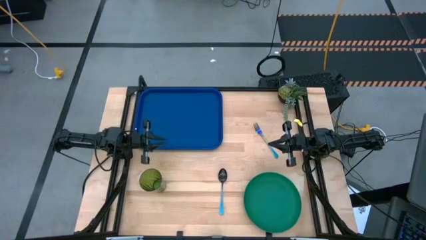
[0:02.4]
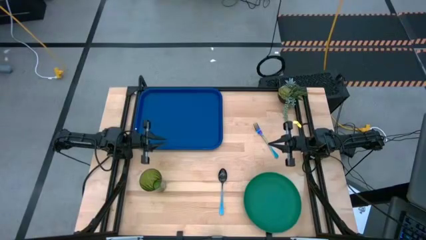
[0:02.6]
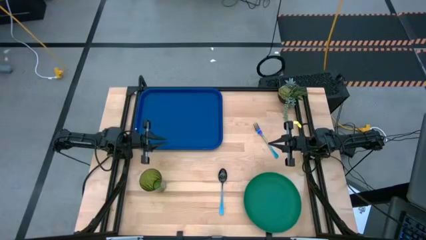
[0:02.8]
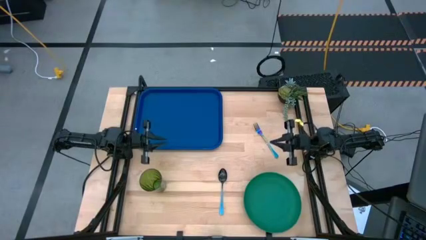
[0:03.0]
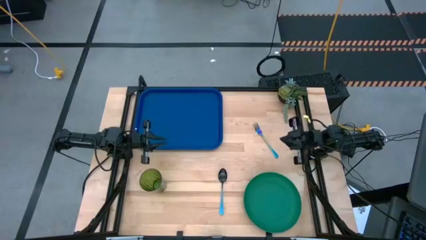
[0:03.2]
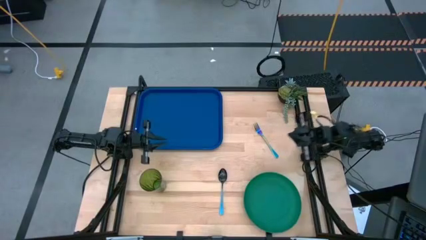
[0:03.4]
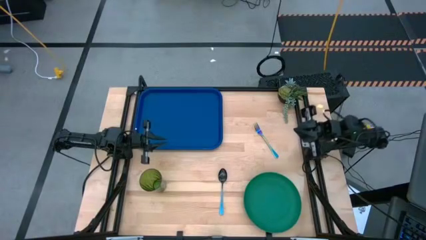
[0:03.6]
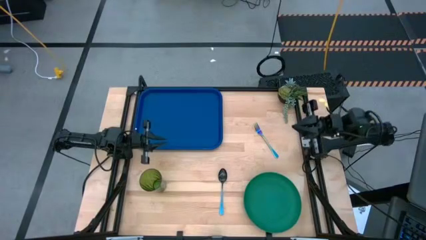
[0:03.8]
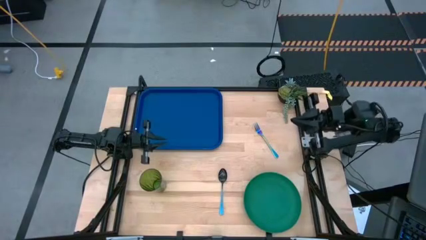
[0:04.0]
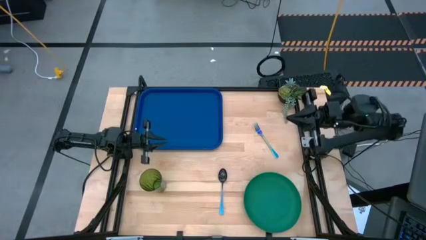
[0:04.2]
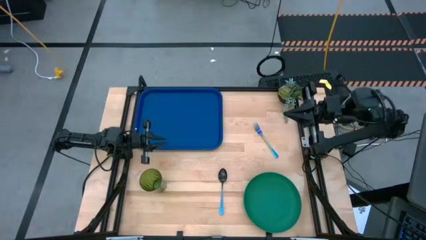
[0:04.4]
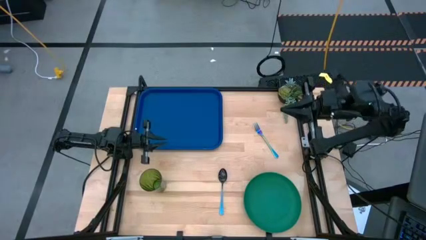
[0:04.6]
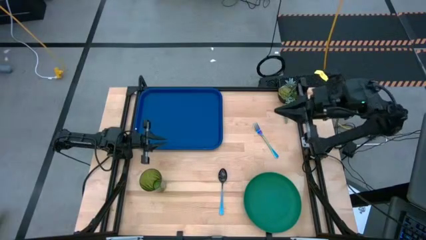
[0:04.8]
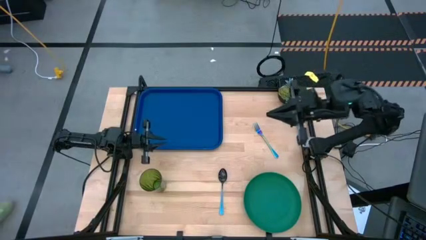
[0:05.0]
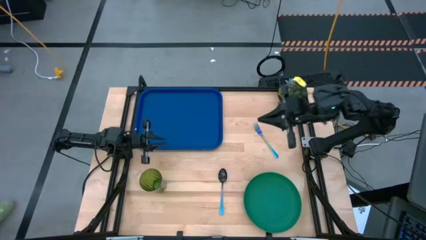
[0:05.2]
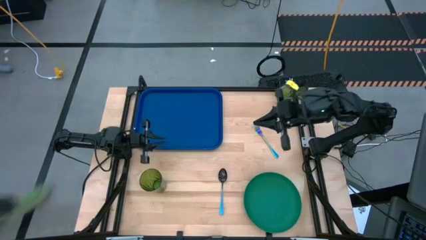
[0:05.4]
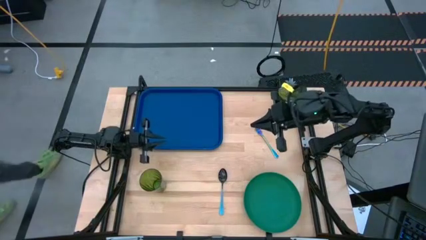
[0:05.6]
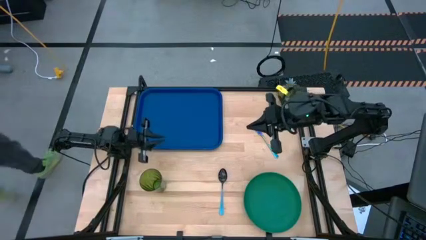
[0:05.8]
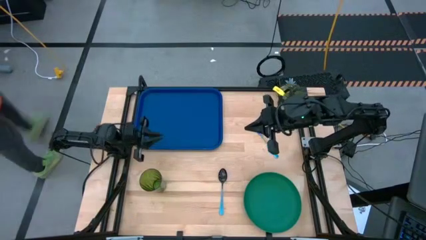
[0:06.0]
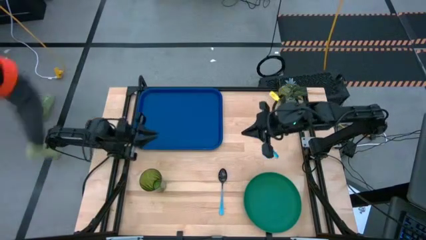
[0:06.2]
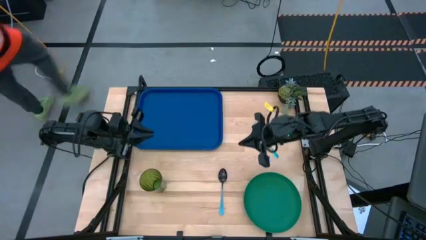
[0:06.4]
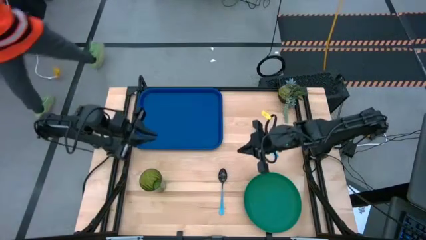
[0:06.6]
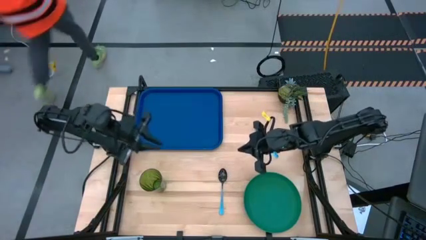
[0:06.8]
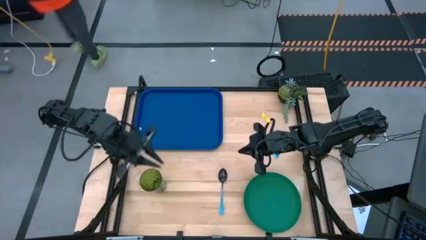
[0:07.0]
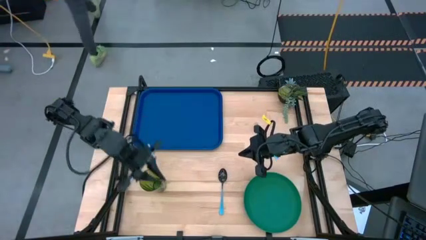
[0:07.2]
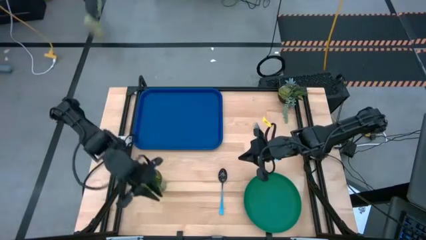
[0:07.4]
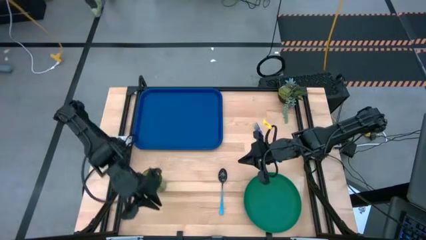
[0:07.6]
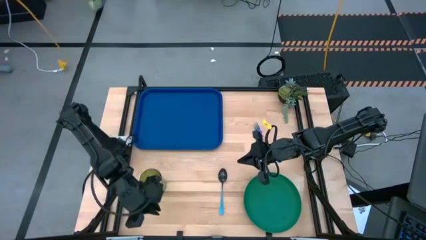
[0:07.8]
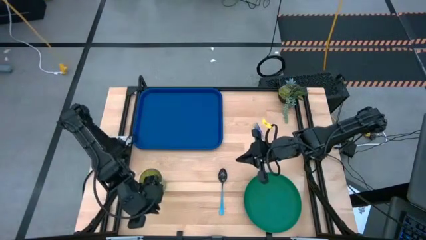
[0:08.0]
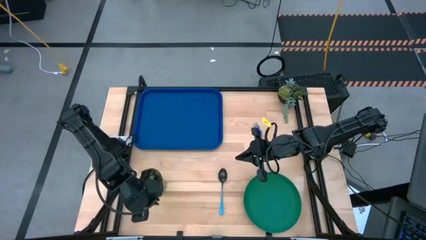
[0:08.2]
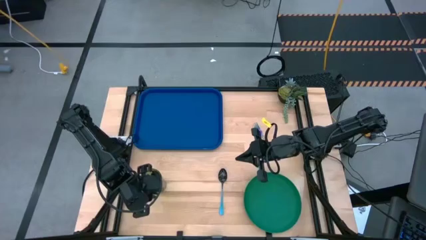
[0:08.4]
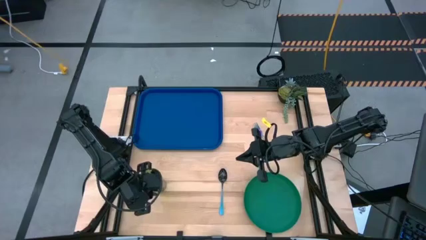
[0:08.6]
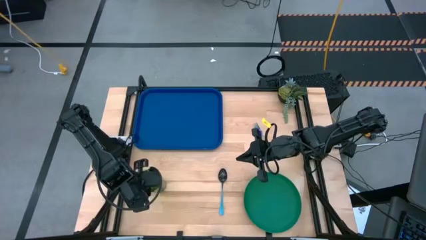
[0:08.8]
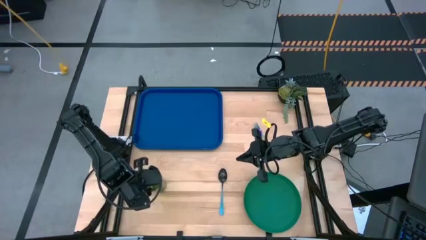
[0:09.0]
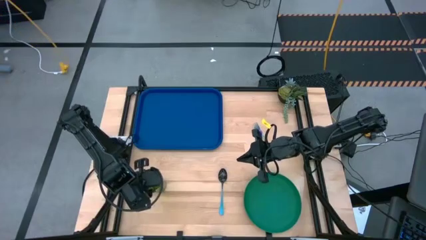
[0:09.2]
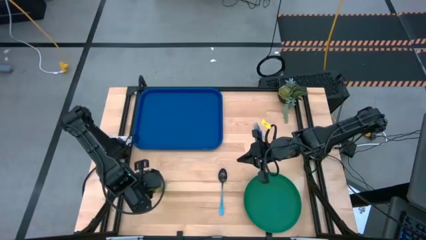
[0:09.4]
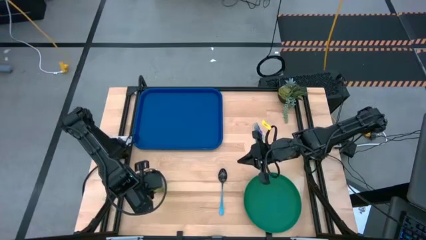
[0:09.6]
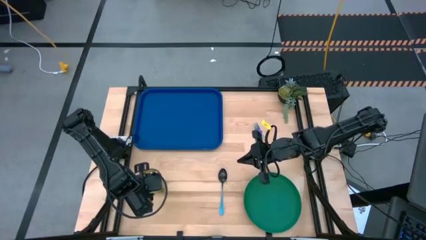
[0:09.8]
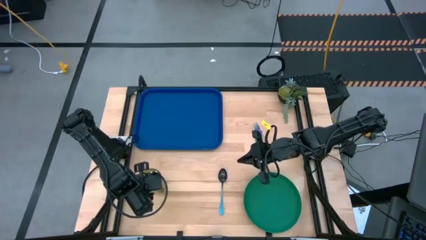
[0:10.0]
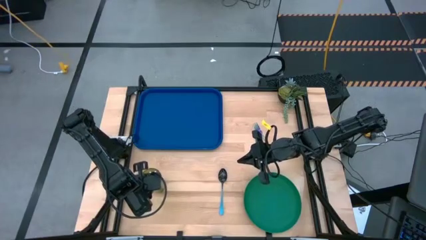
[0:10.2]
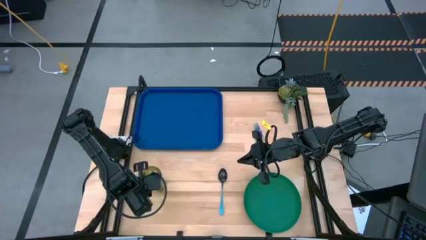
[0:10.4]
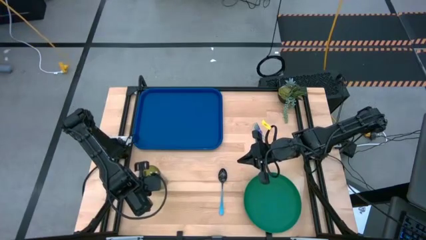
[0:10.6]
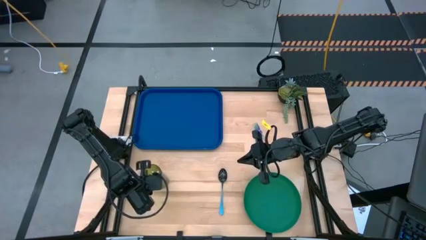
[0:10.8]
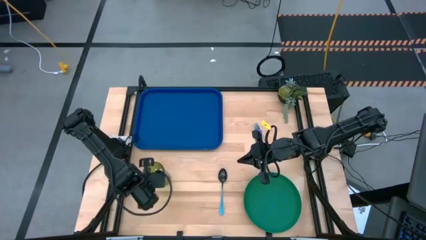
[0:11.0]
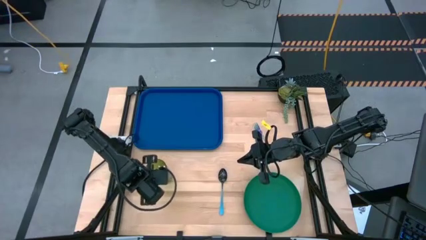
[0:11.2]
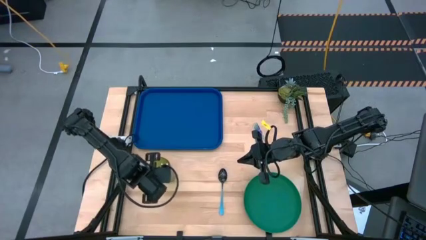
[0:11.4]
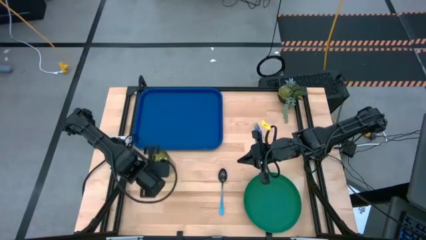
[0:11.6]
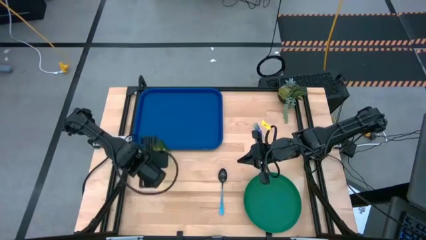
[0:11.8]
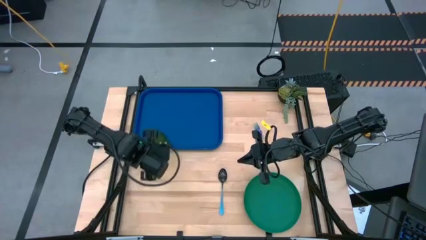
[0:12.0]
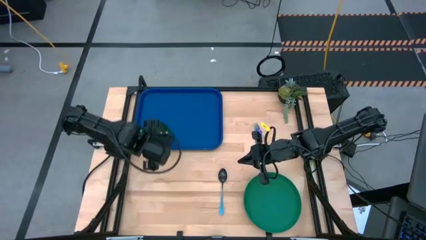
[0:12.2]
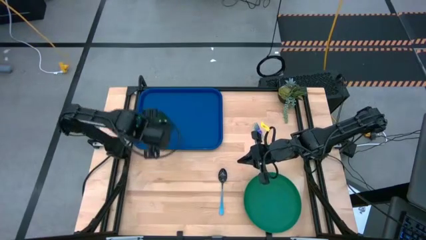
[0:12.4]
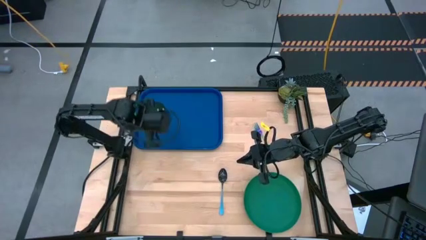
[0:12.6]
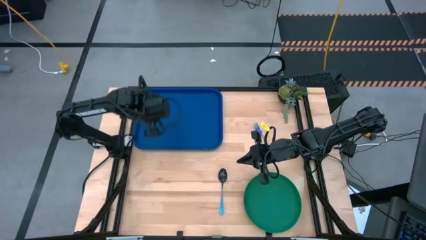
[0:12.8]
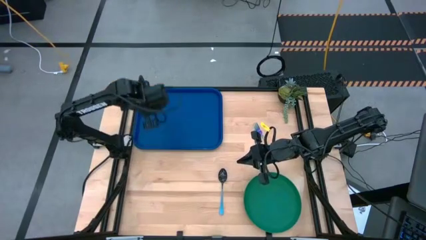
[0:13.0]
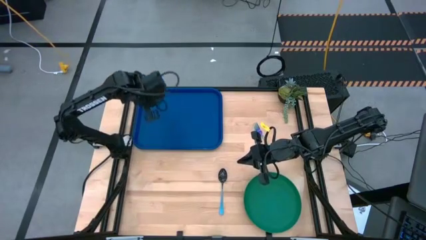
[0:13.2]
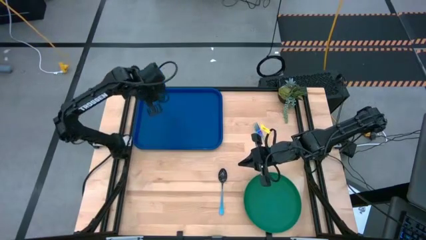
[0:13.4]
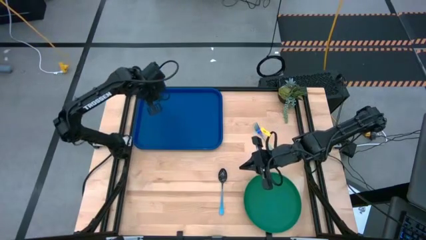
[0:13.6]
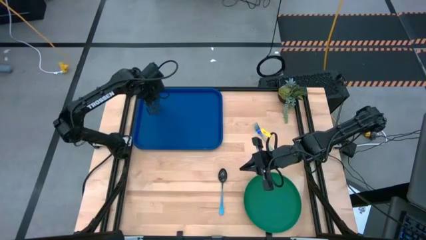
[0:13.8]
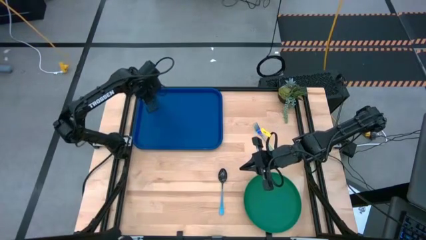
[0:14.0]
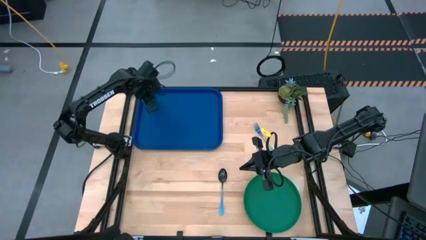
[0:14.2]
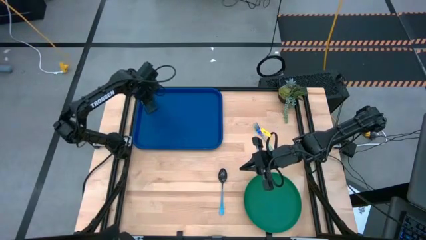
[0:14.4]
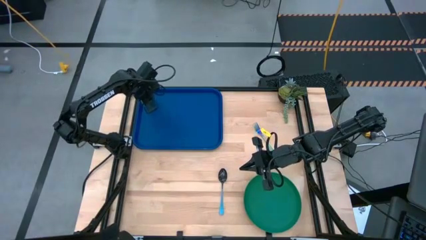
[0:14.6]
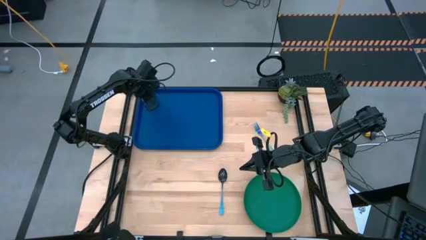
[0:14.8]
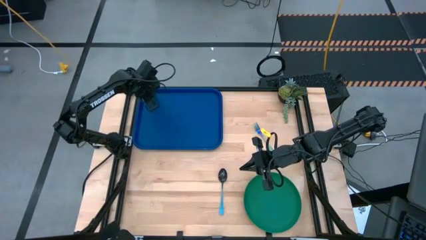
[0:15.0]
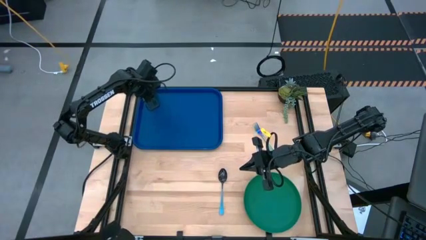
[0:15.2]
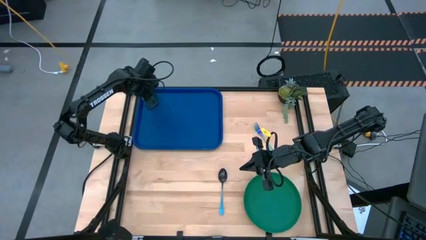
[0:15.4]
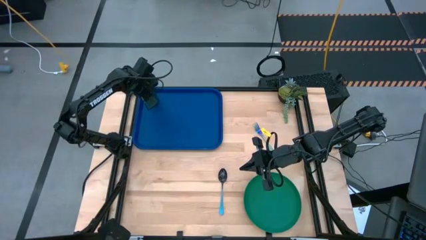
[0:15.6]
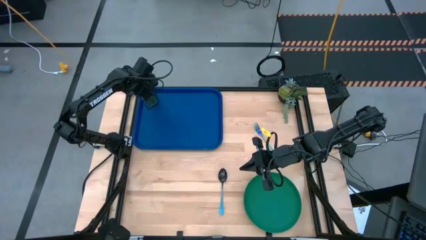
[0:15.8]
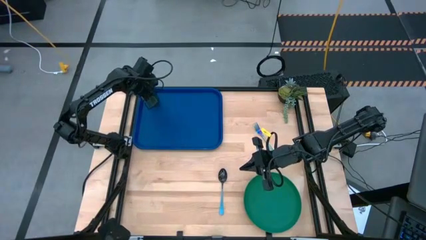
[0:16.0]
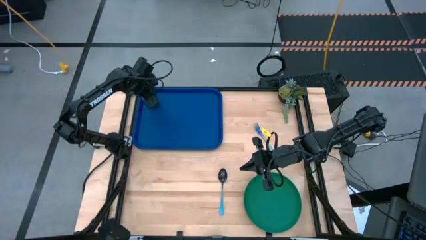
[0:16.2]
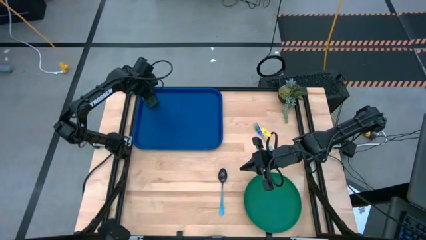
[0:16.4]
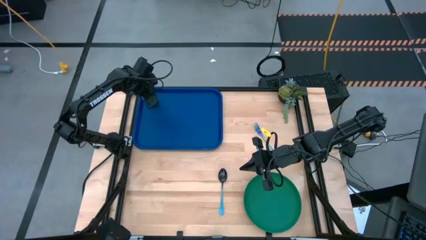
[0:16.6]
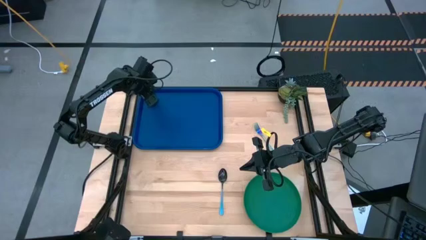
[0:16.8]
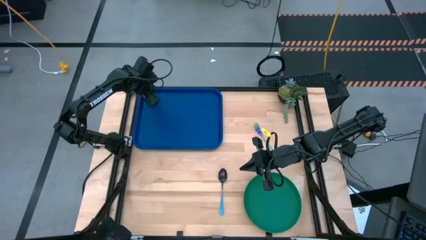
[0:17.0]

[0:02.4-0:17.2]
Task: Pick and place plate/cup/fork/spoon on tray
Put the green glass on the blue tray
